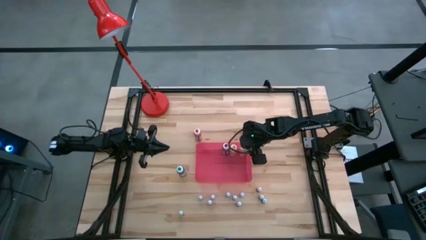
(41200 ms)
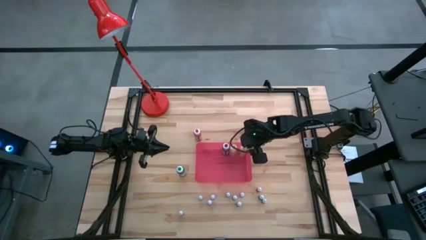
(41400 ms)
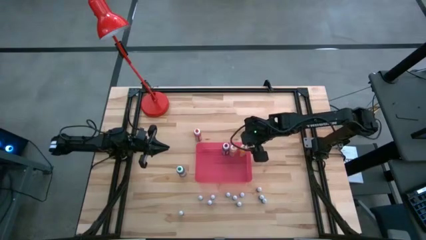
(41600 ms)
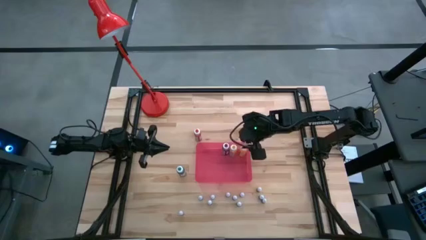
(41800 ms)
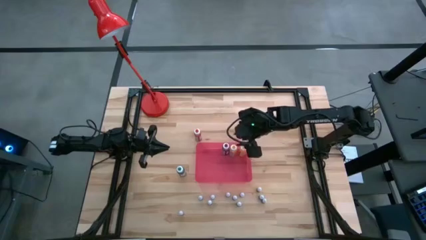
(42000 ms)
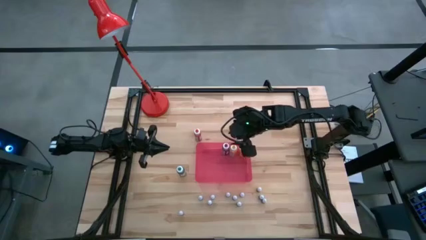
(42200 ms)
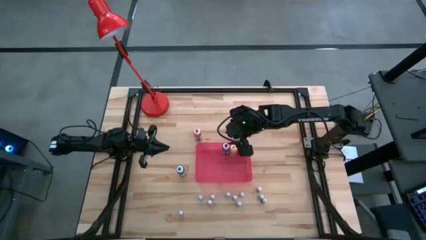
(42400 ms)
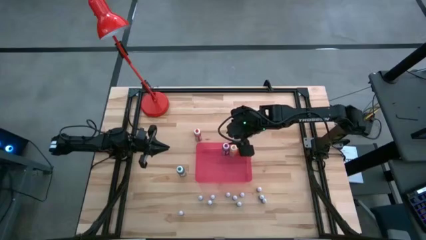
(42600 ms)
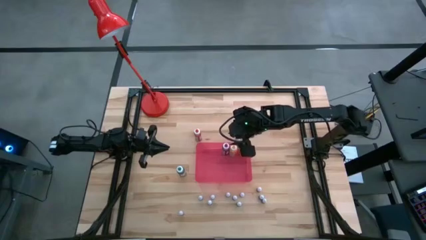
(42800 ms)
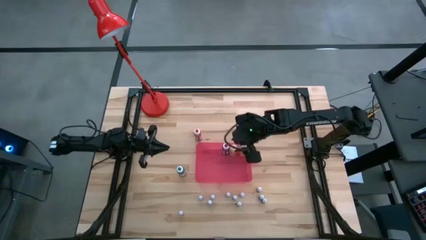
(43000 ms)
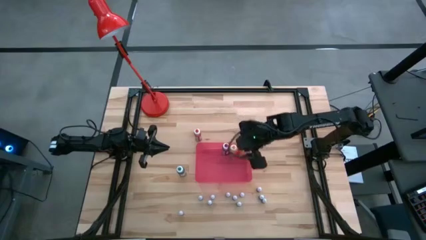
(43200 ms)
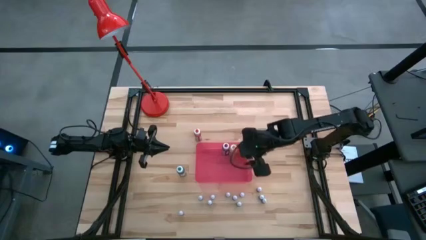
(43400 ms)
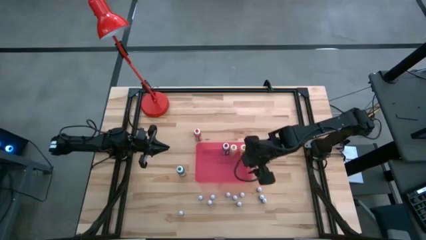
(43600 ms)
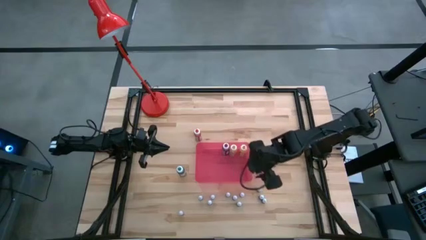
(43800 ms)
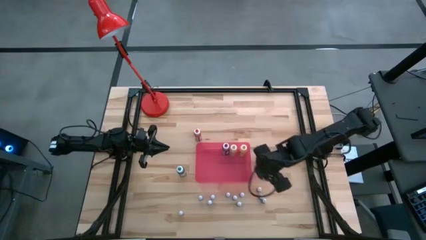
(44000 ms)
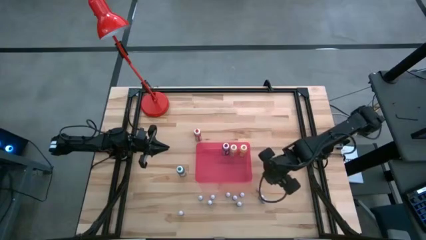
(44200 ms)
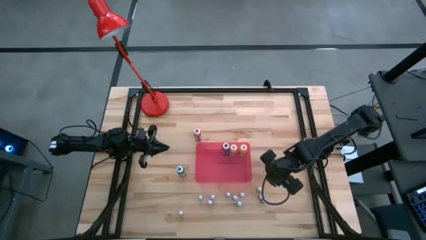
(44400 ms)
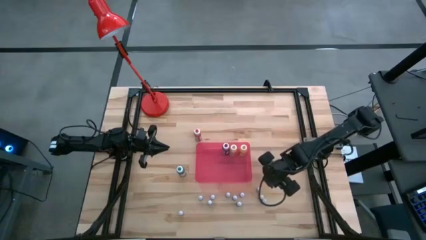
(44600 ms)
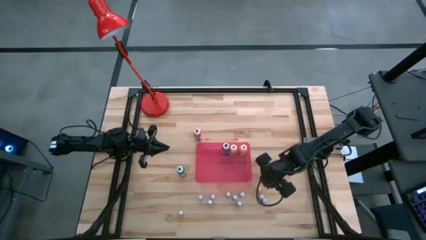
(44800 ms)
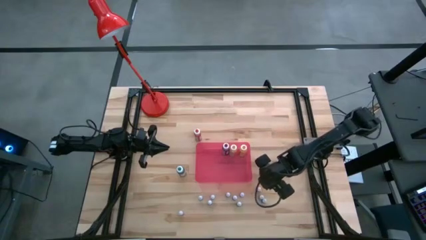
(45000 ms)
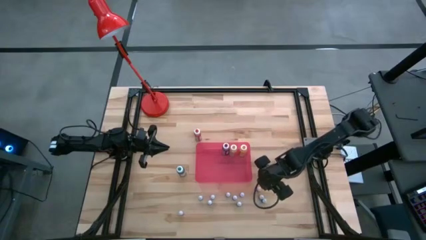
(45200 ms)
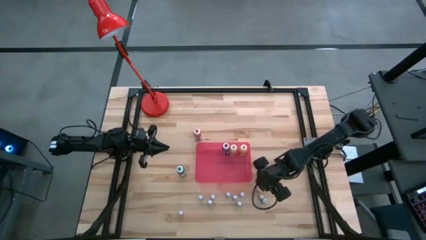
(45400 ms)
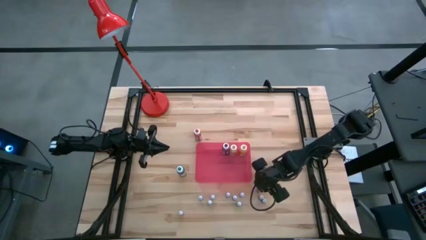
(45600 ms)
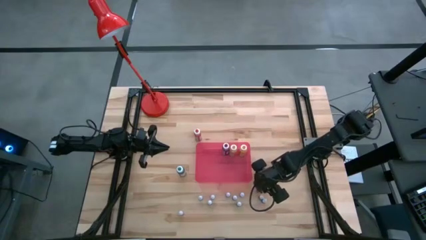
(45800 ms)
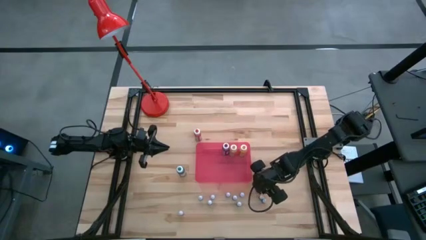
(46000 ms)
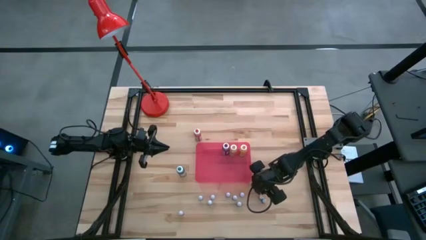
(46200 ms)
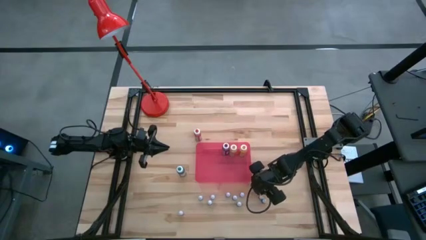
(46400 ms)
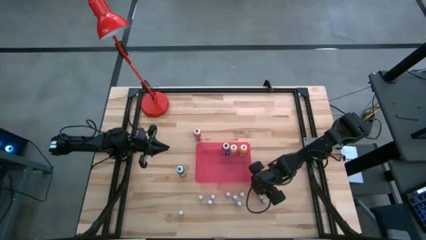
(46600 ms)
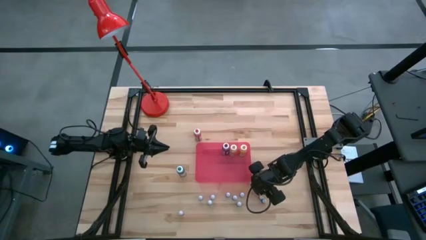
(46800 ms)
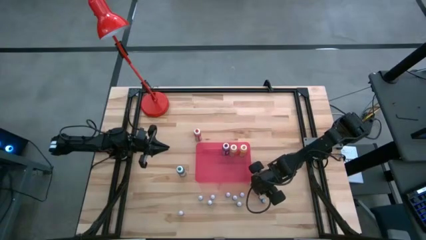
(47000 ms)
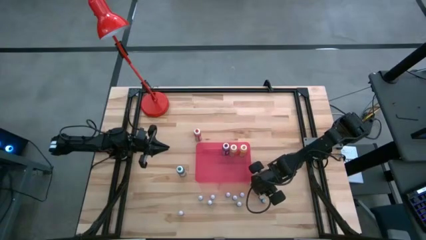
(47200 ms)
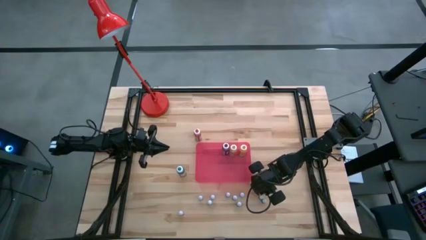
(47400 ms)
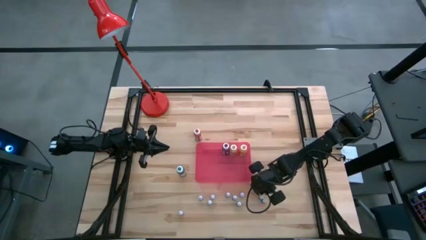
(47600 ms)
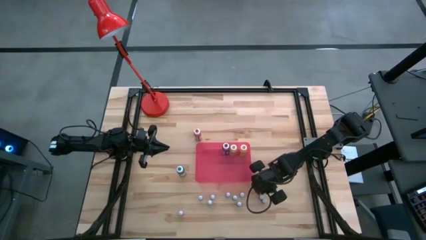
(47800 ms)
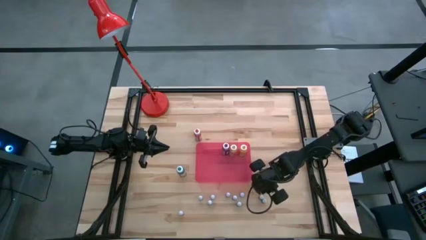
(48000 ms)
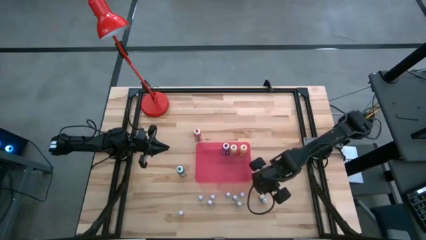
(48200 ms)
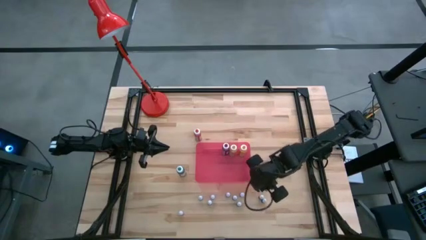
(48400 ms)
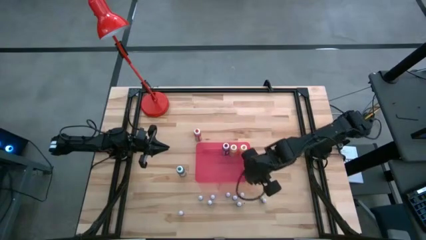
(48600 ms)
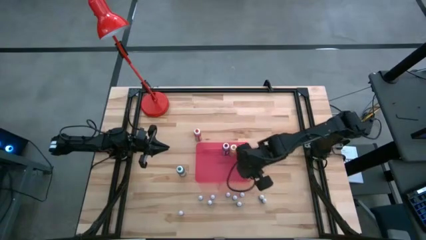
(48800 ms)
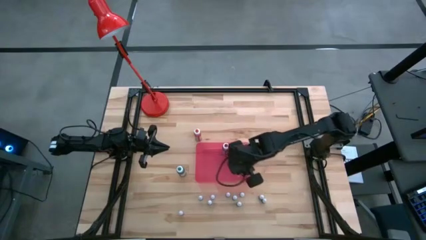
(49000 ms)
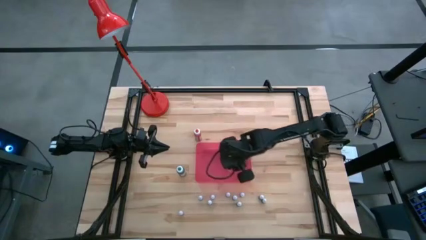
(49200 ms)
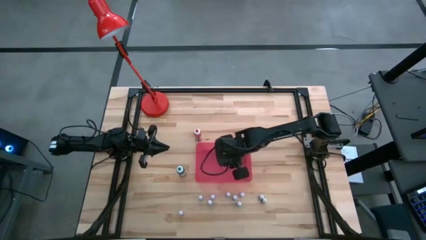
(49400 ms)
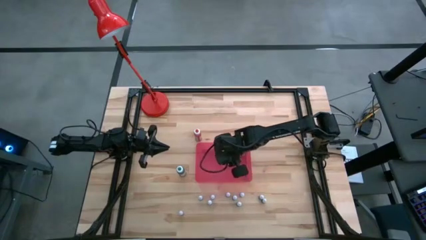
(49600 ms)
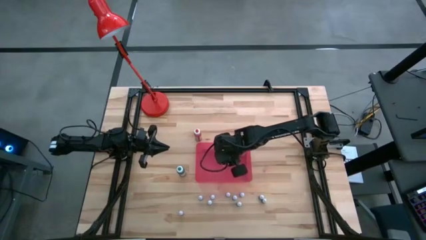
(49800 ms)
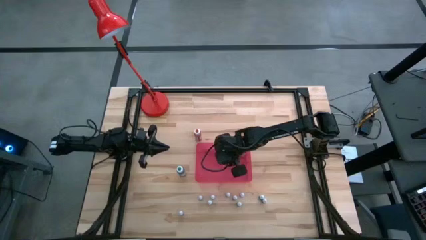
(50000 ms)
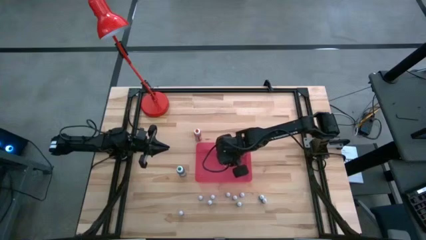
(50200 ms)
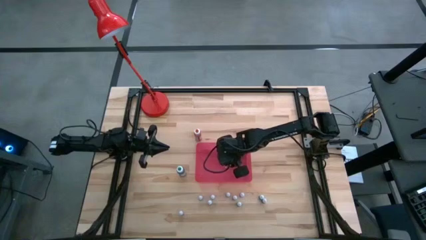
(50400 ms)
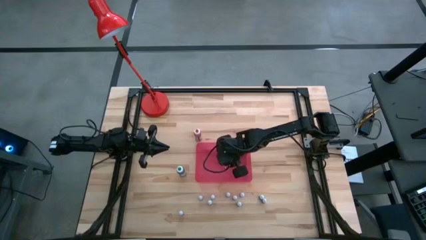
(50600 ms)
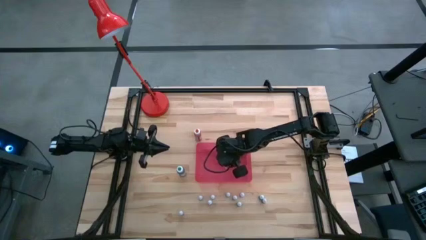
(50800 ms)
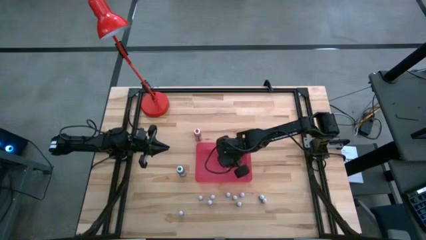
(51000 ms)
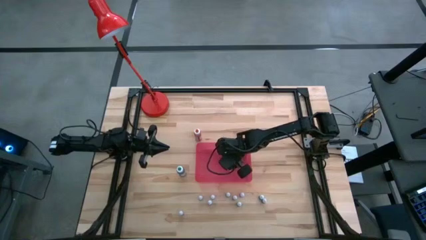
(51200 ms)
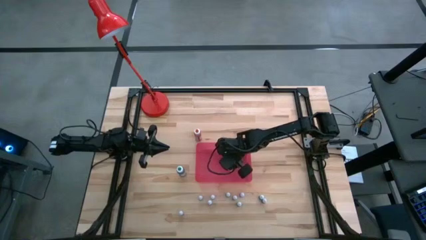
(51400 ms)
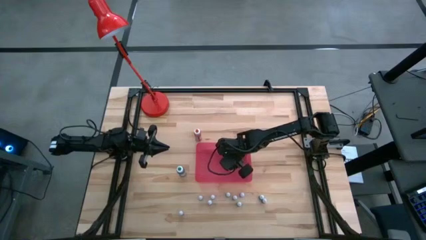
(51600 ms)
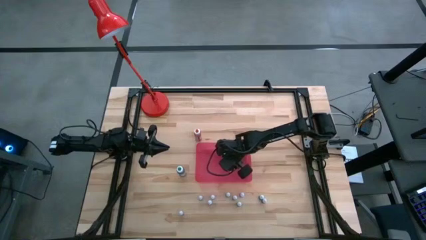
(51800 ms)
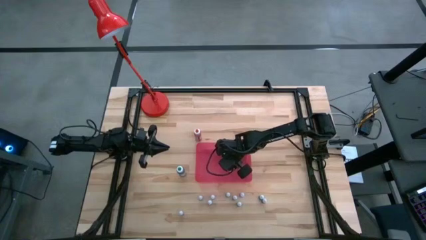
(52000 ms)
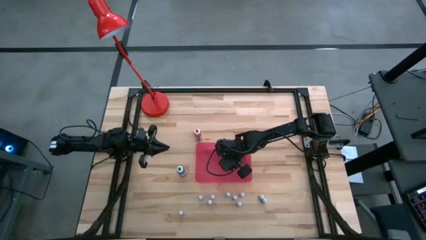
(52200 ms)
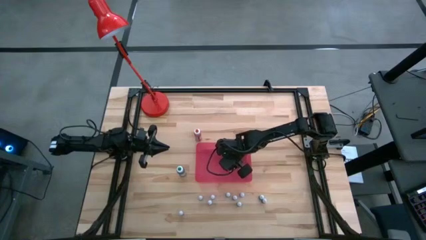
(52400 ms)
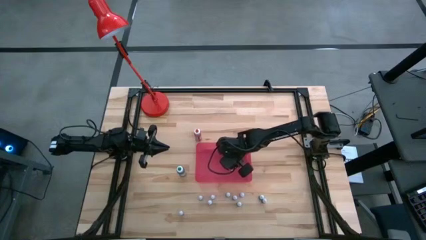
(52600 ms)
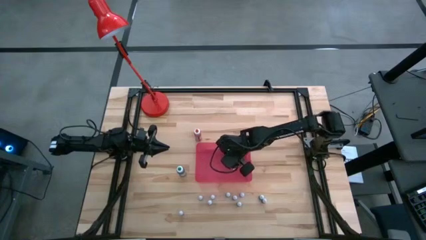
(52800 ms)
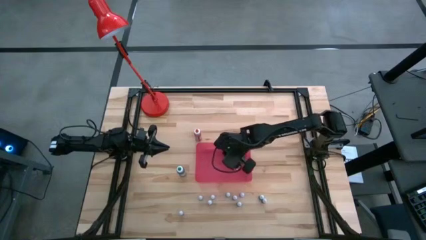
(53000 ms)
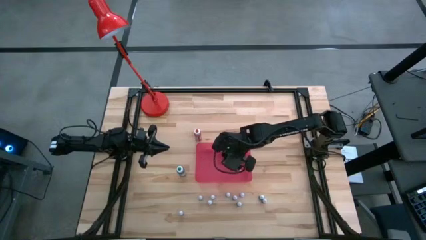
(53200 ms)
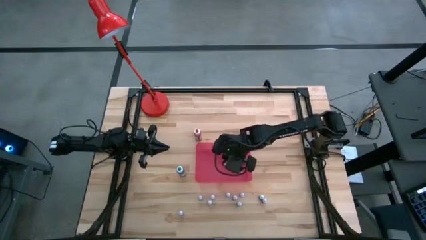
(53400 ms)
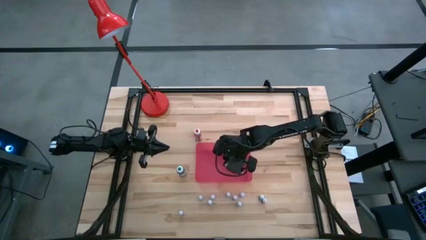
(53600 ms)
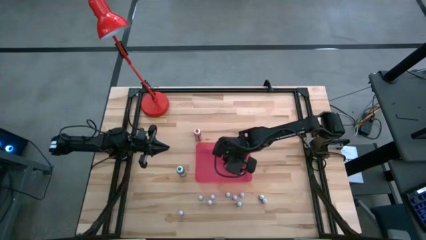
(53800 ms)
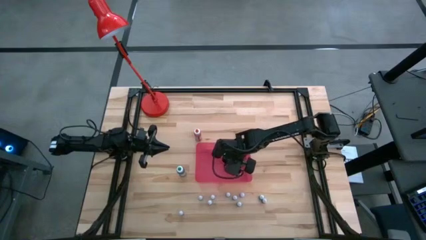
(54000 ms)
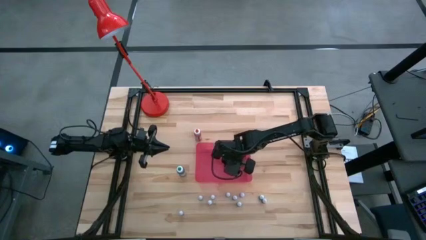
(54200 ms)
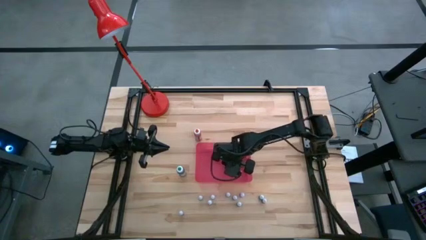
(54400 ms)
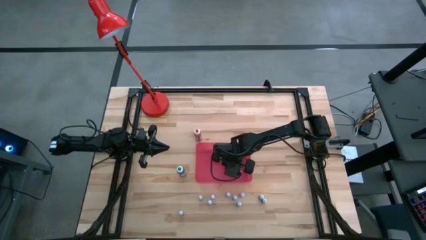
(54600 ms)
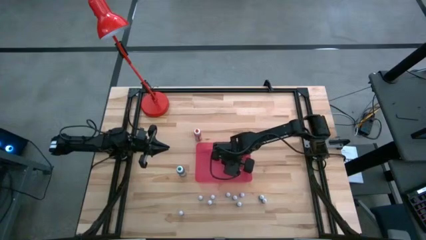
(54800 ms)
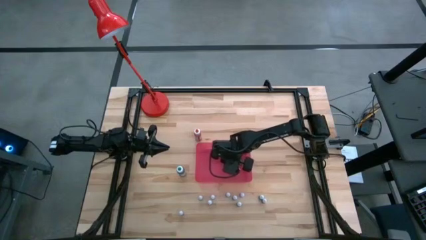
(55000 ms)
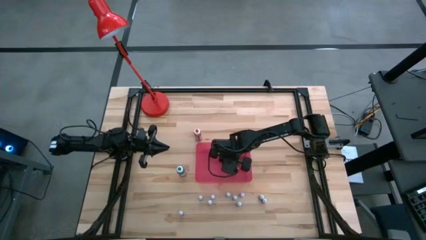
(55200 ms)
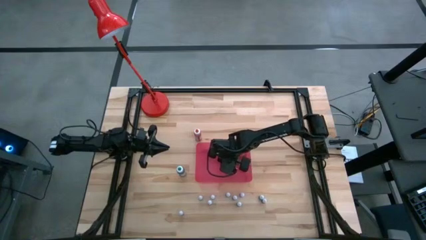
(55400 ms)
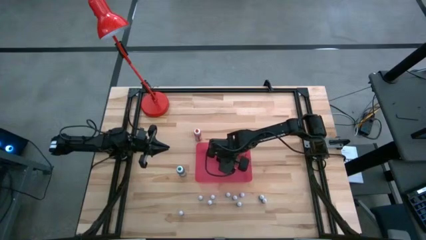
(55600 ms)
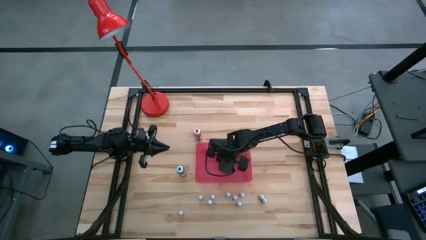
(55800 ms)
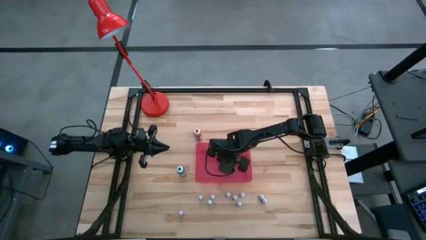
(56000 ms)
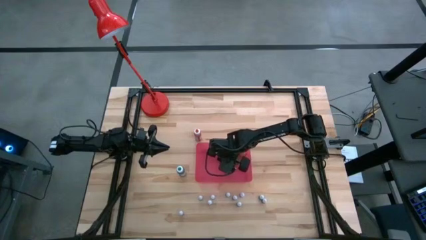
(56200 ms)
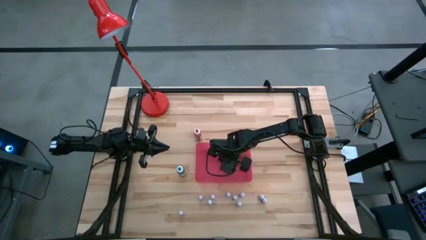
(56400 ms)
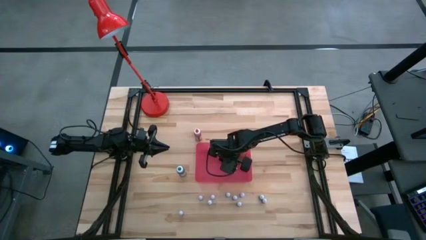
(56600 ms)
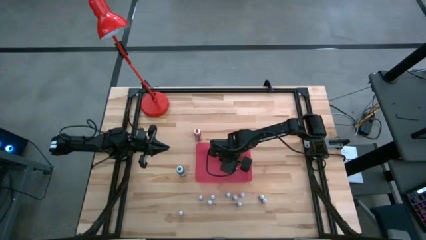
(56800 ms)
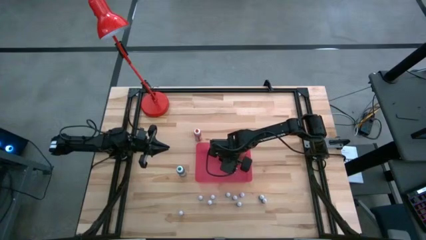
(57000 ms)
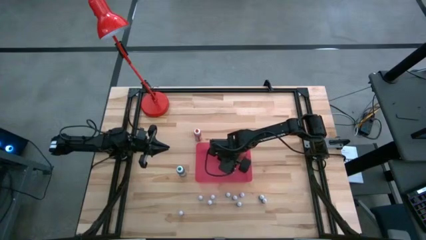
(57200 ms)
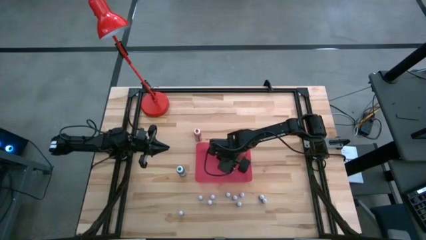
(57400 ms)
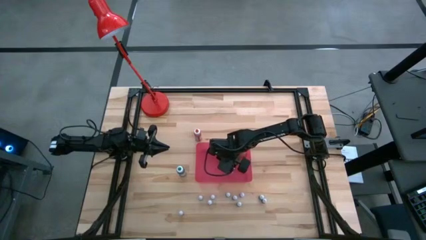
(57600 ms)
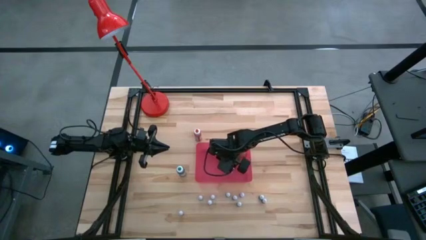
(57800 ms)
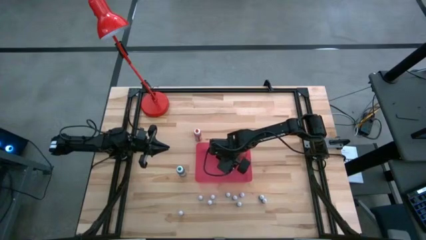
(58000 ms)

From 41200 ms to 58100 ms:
Task: Pick & Place food coloring
Put the small red food coloring bottle into the container

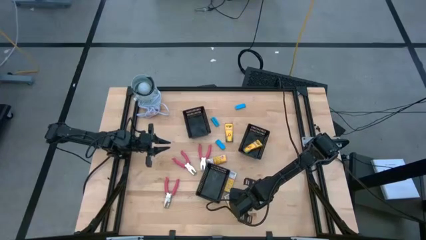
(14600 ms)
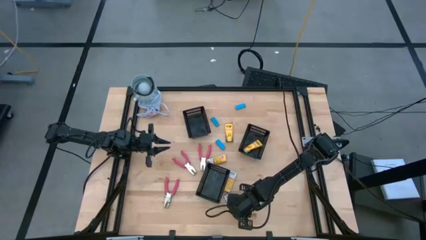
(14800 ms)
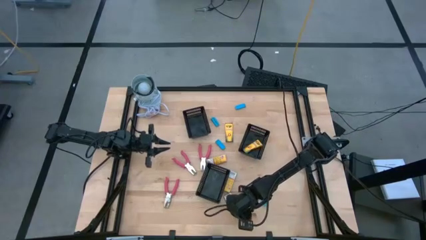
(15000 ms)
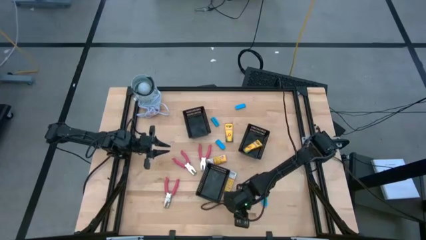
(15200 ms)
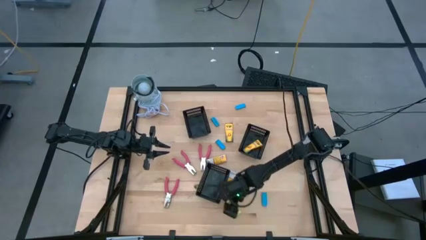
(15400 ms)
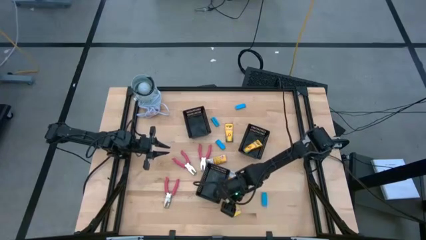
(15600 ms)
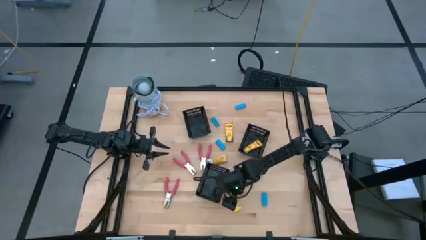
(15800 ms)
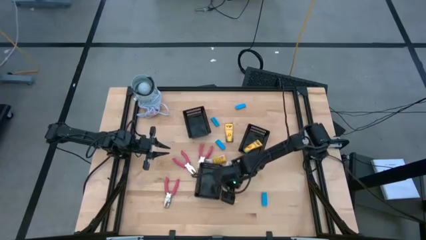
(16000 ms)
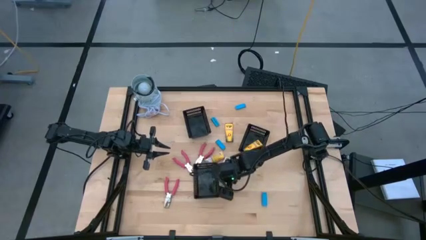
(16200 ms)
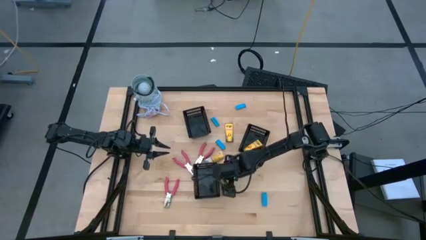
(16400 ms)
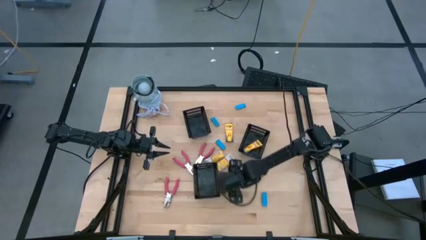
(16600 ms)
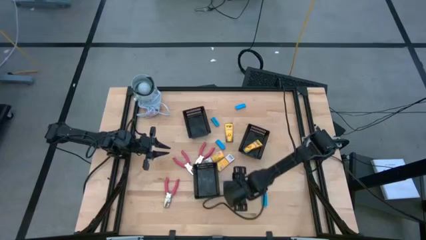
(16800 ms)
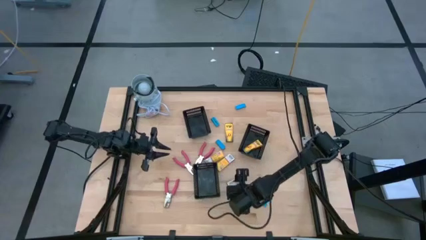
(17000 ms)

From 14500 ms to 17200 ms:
Task: Pick & Place School Supplies
Move the crayon to the centre of the table
